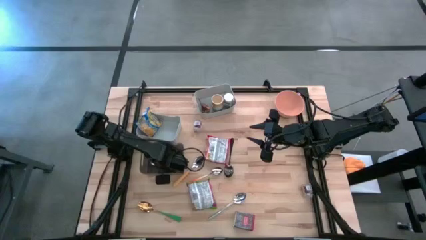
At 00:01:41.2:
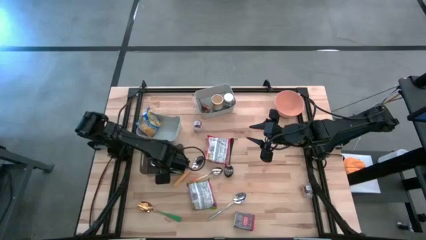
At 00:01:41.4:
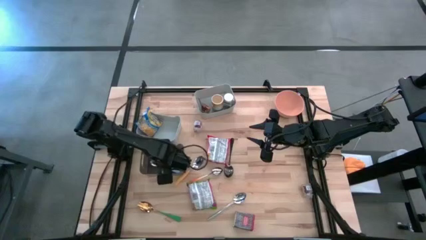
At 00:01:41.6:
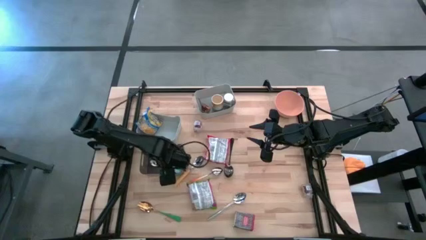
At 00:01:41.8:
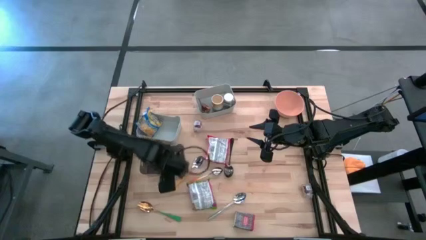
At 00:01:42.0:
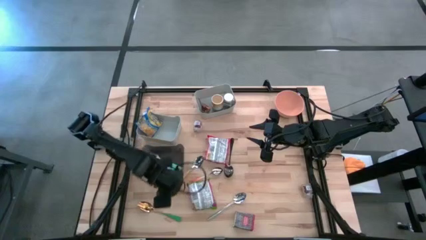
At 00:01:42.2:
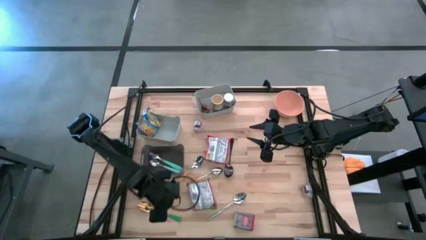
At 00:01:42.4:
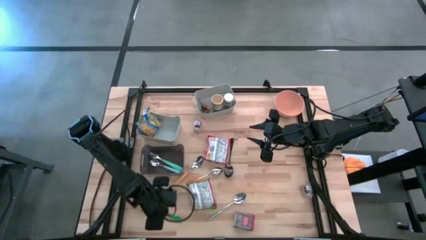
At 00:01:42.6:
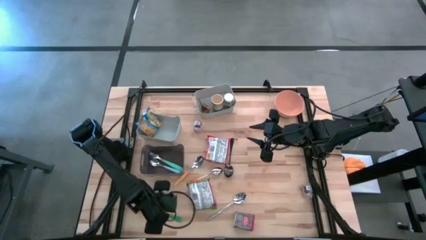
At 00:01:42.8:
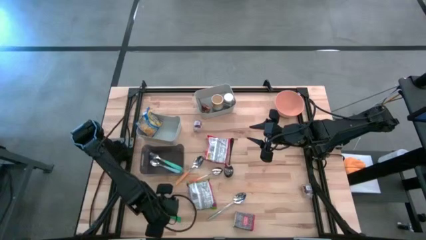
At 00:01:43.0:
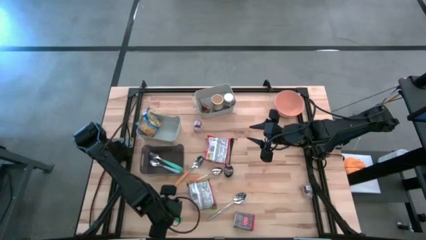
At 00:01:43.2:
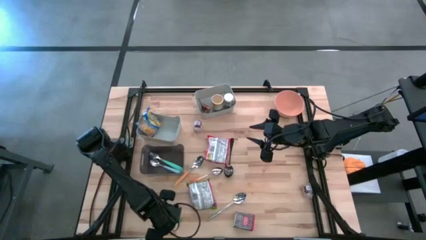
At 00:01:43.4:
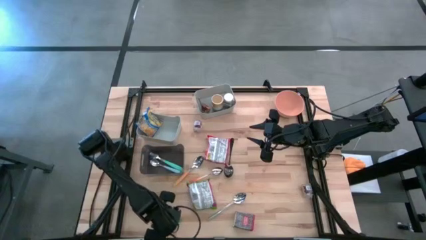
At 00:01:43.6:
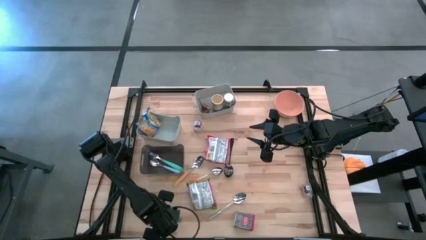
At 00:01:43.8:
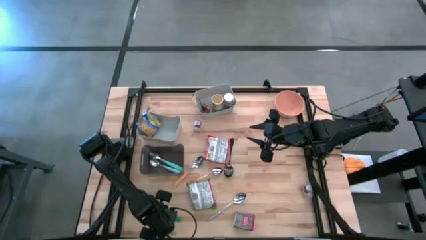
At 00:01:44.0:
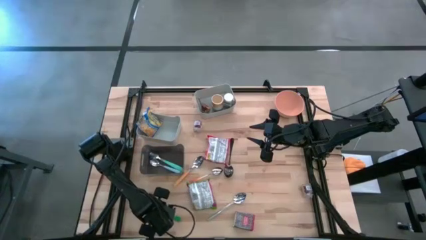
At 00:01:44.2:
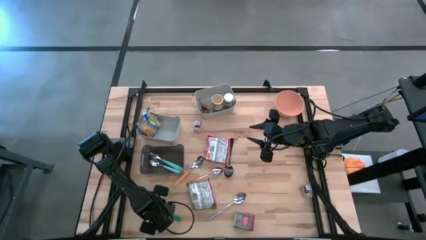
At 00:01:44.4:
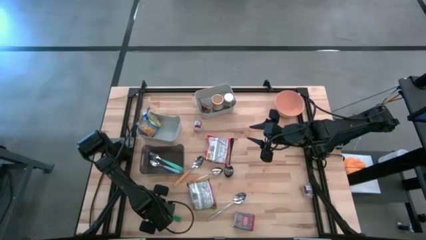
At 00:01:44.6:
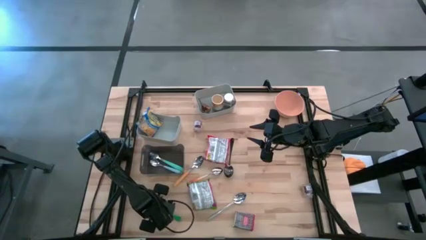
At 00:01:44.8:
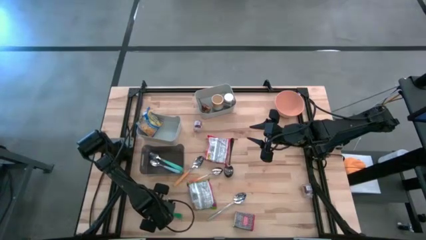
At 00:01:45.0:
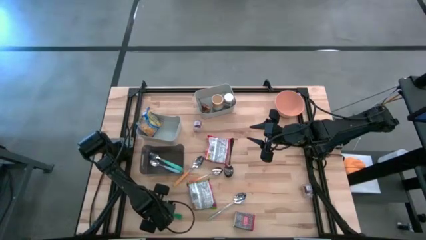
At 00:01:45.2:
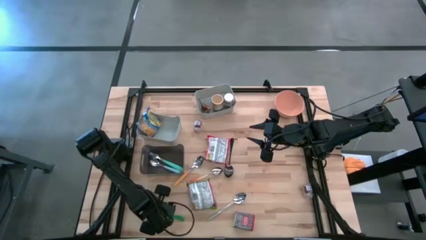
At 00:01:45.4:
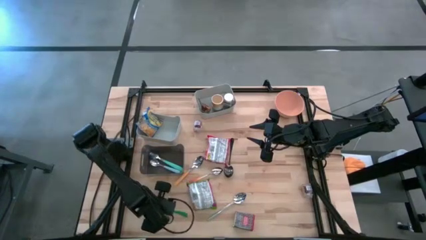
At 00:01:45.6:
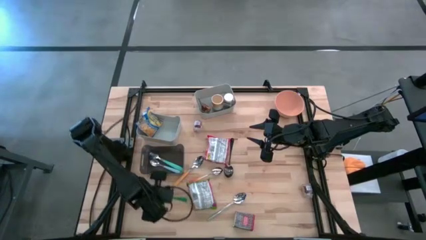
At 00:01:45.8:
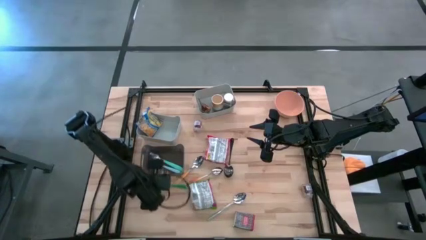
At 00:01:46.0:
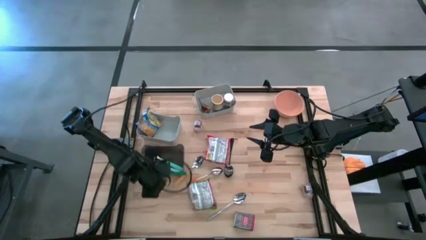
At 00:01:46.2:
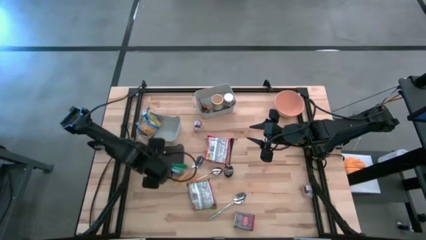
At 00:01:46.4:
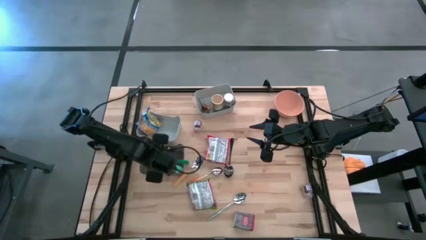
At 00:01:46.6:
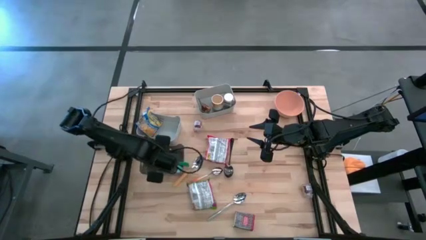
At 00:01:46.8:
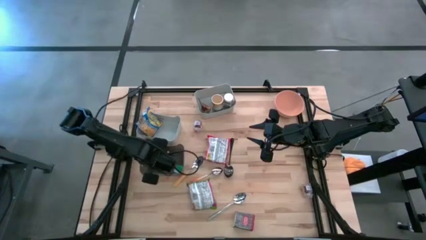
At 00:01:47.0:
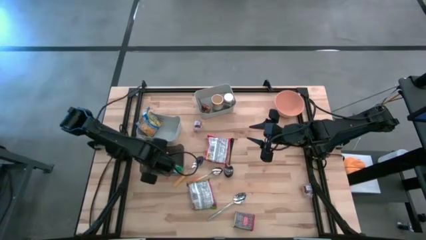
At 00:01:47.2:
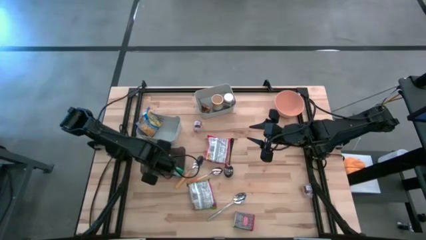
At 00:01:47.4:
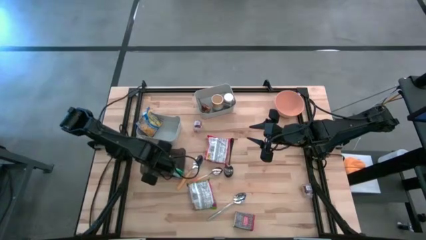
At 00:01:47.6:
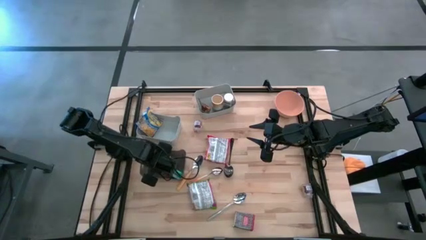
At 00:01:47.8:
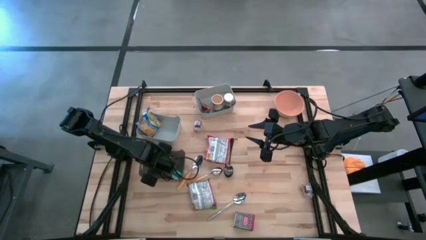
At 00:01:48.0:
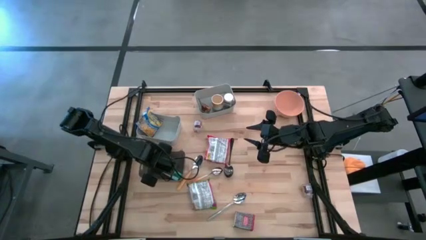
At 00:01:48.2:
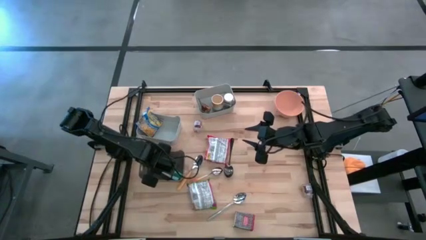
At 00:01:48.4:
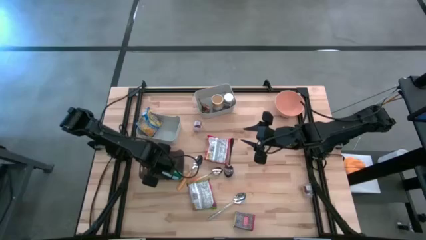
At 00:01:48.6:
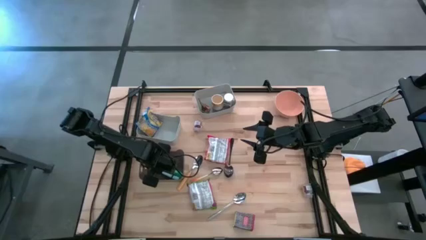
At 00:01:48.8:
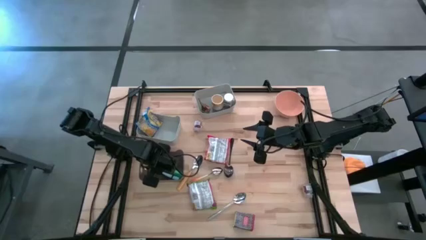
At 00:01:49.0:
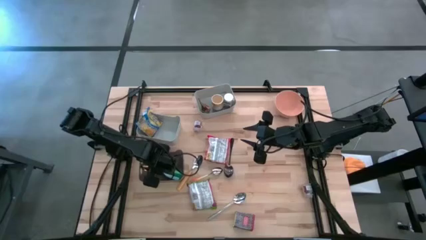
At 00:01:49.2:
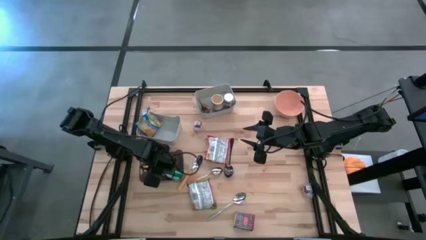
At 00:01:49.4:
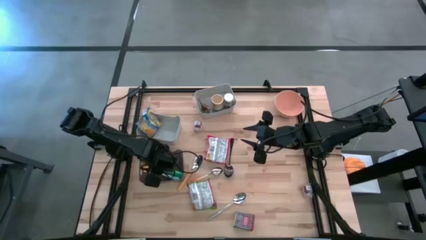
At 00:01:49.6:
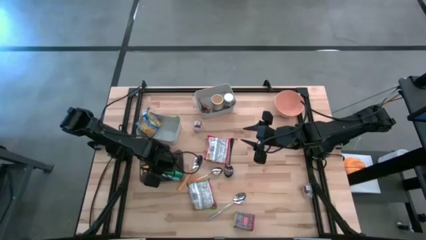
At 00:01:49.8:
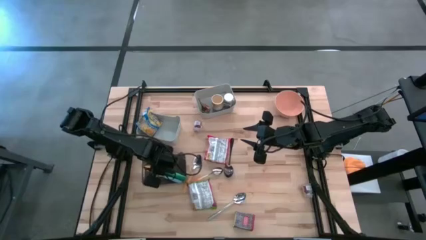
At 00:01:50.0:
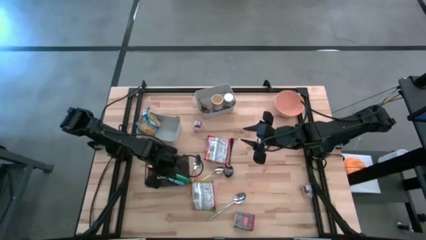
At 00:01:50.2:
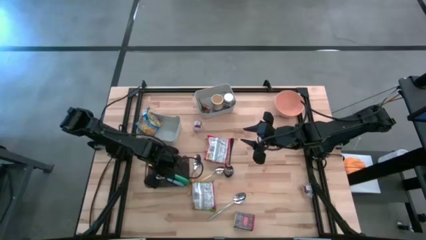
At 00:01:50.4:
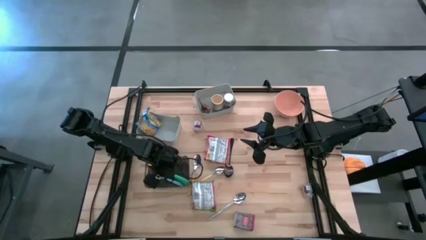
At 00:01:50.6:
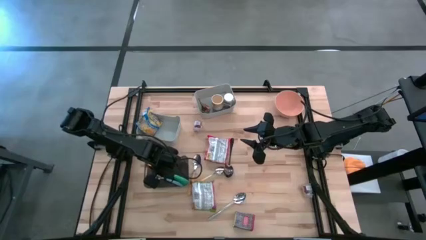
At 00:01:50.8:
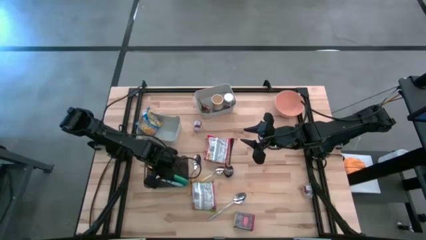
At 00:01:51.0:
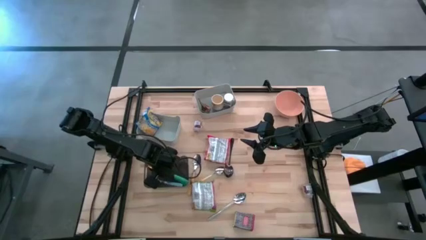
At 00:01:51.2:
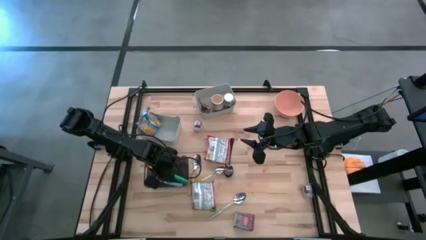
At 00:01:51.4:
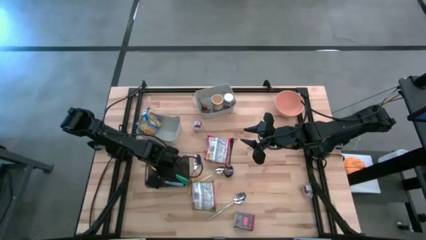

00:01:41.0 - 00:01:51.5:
Put the green spoon into the black bin

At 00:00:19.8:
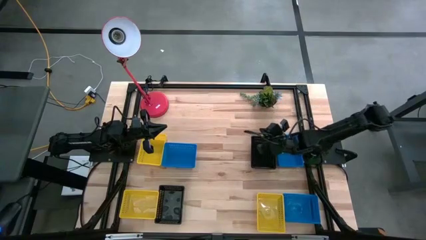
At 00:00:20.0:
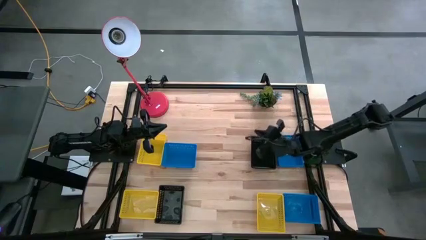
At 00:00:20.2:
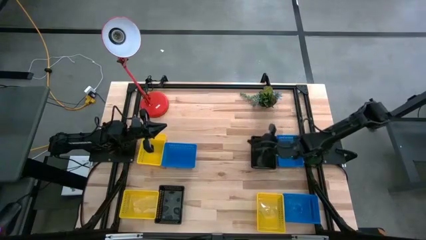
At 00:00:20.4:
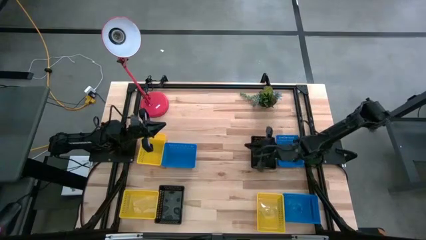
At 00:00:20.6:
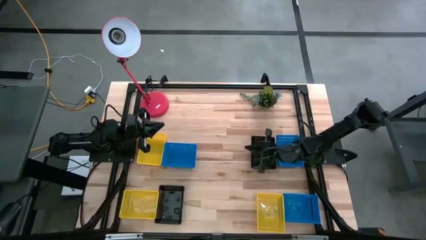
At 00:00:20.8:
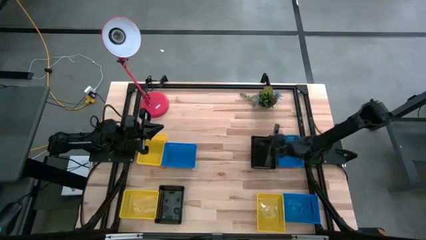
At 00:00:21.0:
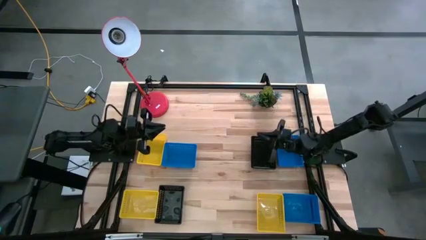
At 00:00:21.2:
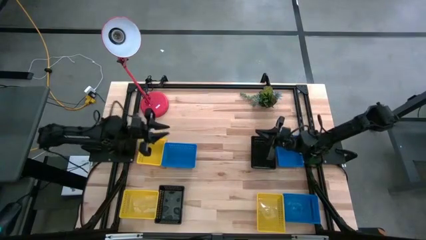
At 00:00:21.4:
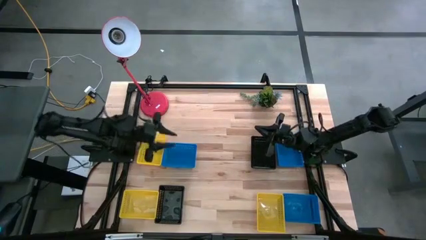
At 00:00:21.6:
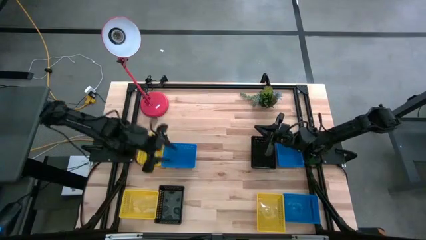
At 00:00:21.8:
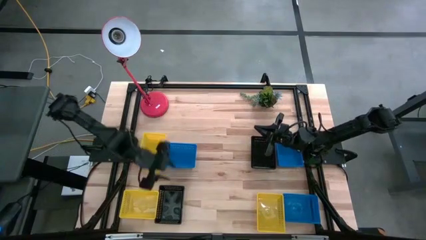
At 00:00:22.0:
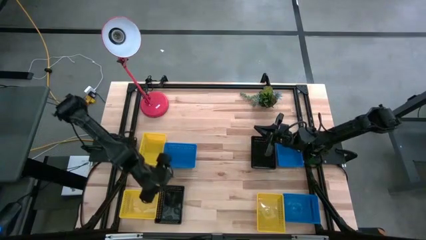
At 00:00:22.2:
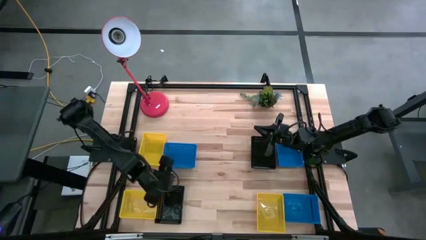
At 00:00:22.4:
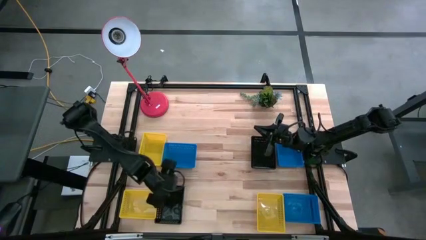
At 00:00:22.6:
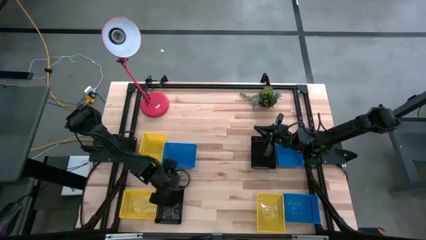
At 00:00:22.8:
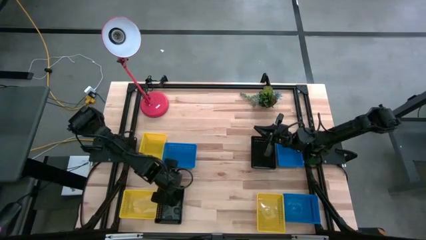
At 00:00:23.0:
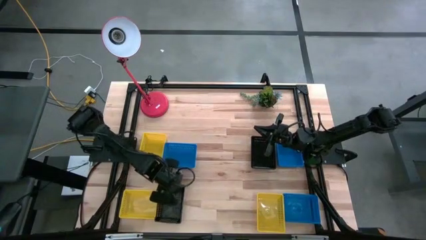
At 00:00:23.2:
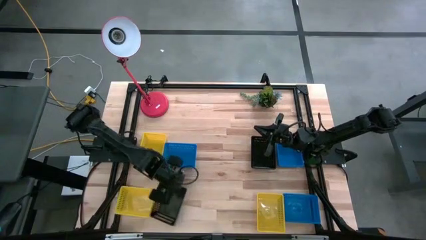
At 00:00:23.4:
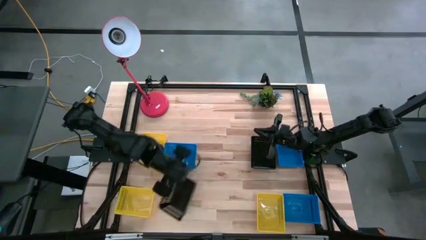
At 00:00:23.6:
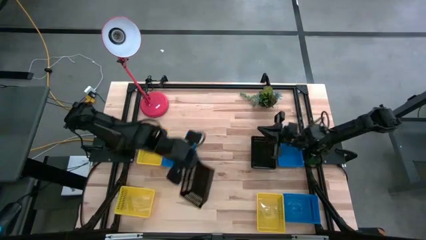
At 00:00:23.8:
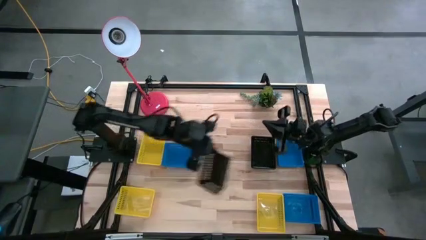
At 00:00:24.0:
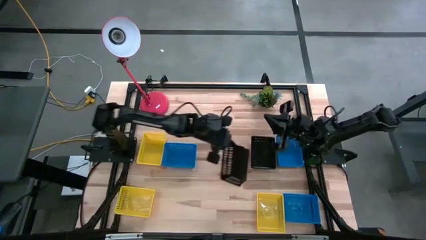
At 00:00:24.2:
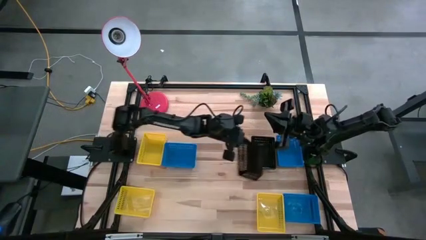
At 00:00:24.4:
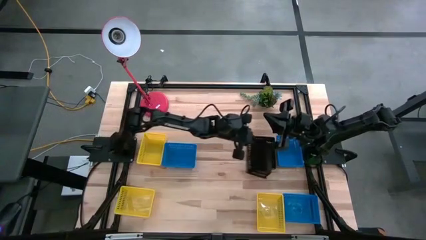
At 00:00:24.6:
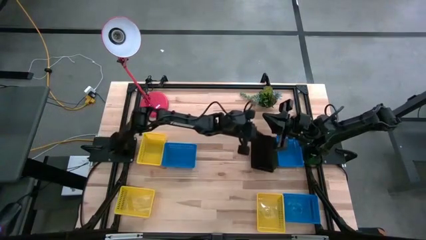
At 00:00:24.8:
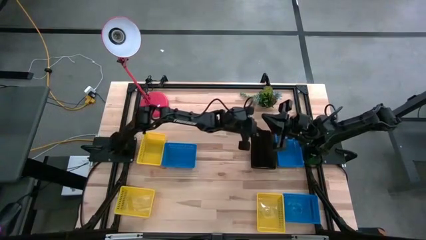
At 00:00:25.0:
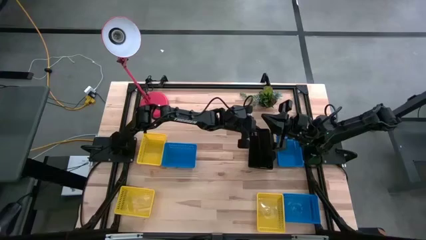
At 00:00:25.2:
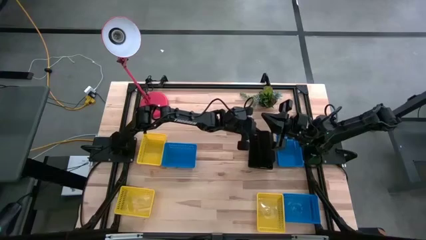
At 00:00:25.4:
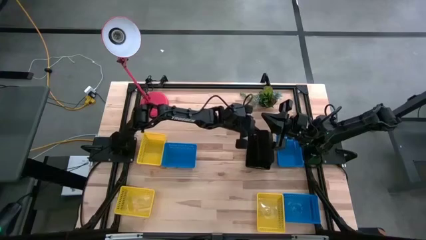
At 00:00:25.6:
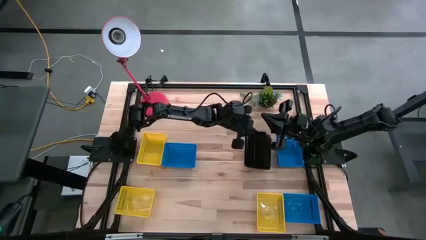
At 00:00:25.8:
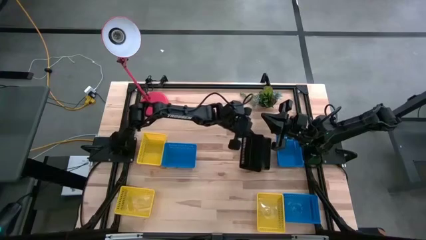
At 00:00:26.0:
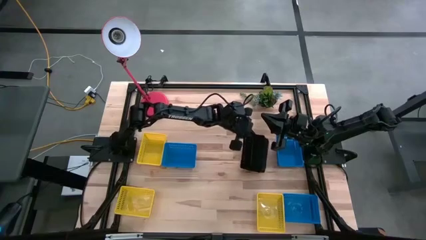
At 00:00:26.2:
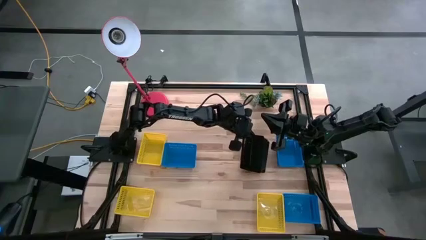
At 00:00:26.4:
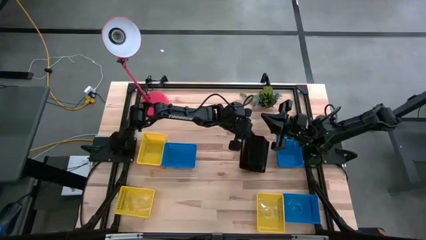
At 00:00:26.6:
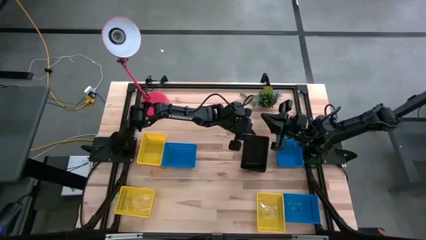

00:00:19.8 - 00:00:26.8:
Stack the bottom black basket on the top black basket
